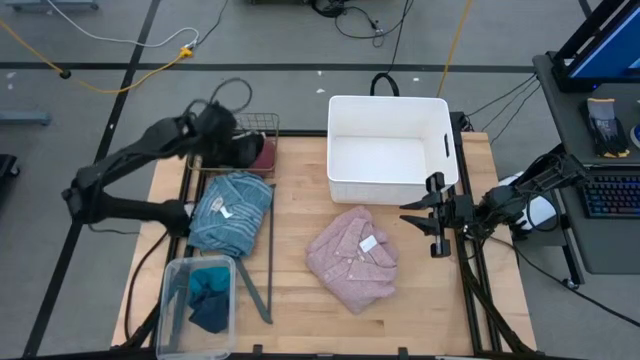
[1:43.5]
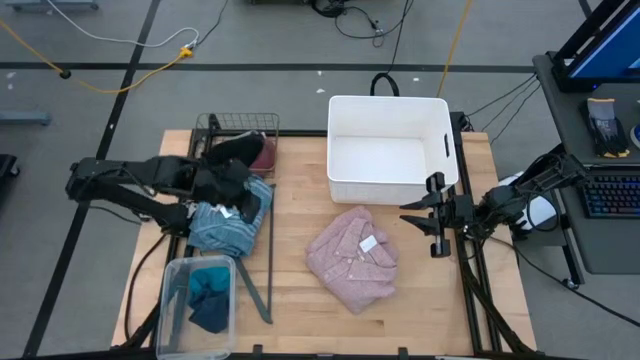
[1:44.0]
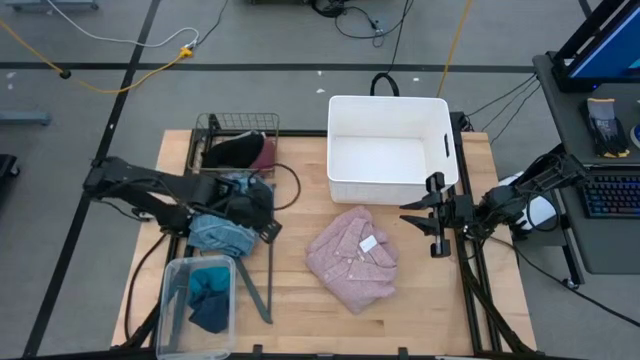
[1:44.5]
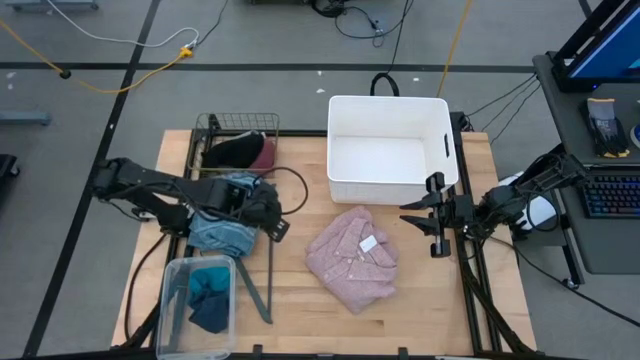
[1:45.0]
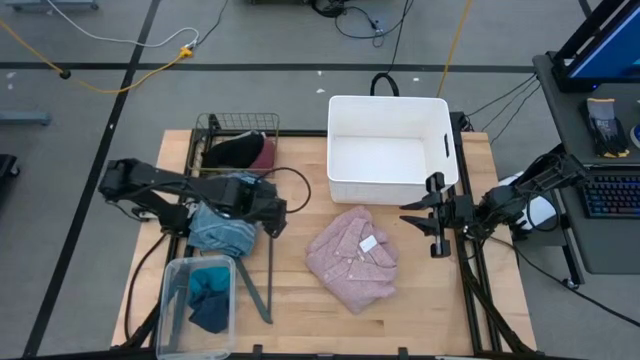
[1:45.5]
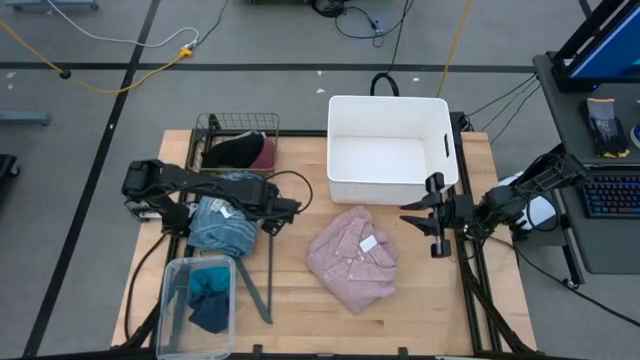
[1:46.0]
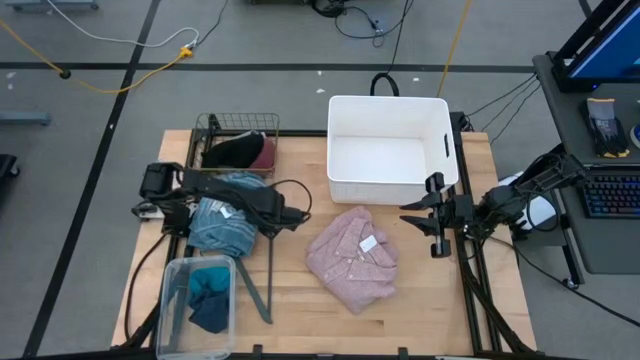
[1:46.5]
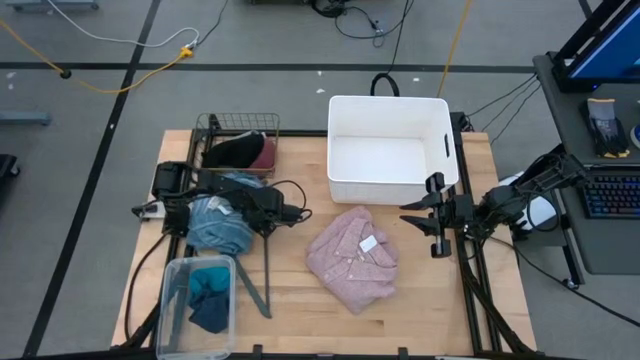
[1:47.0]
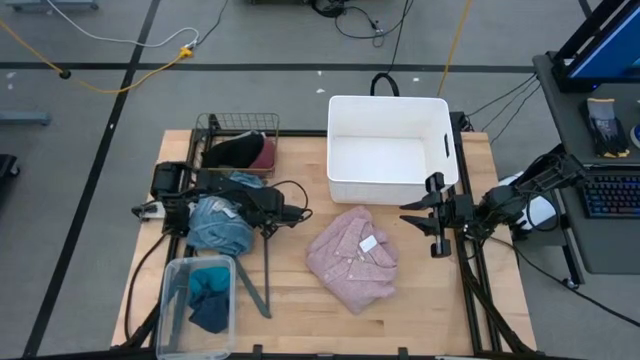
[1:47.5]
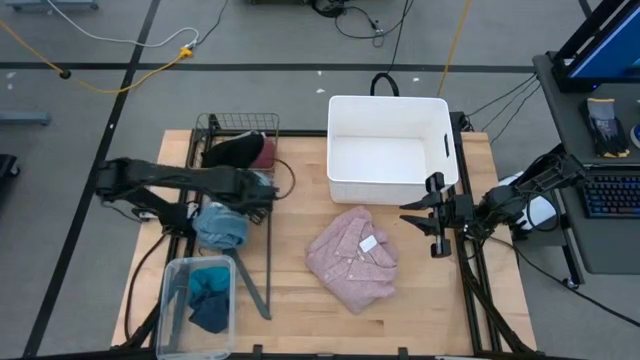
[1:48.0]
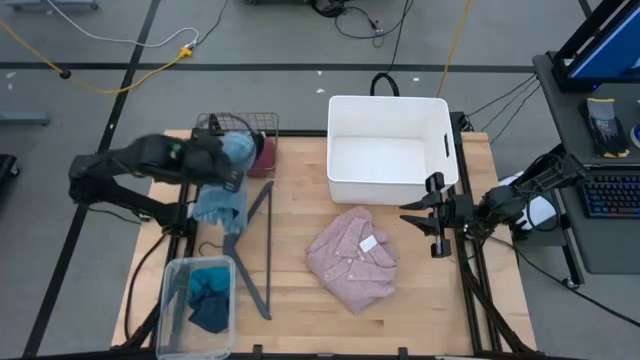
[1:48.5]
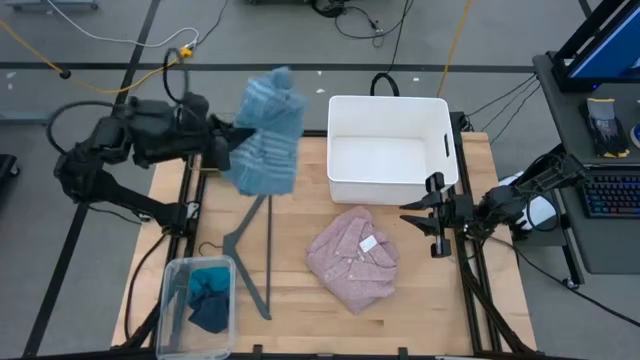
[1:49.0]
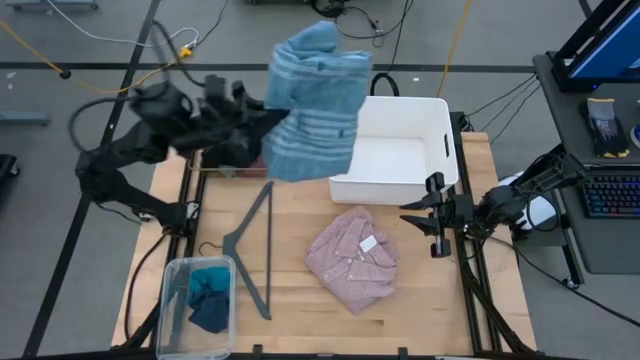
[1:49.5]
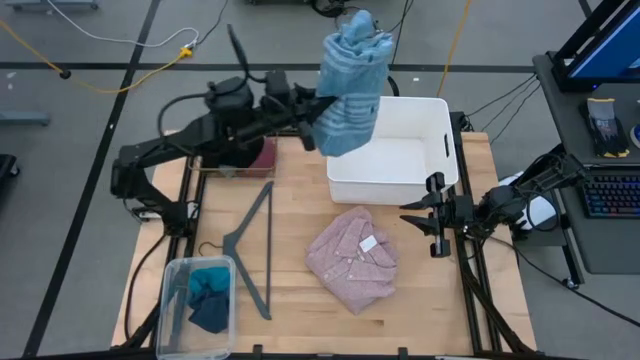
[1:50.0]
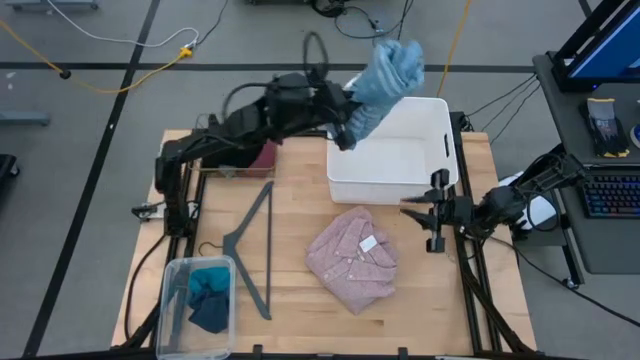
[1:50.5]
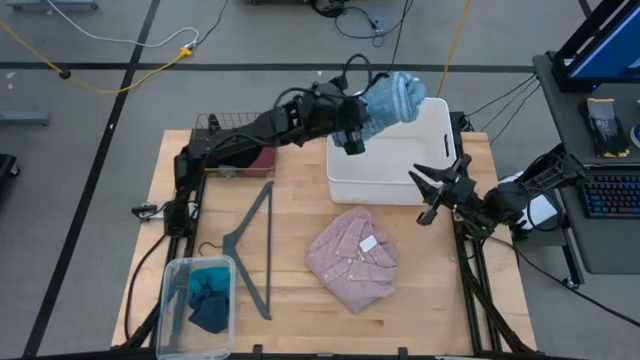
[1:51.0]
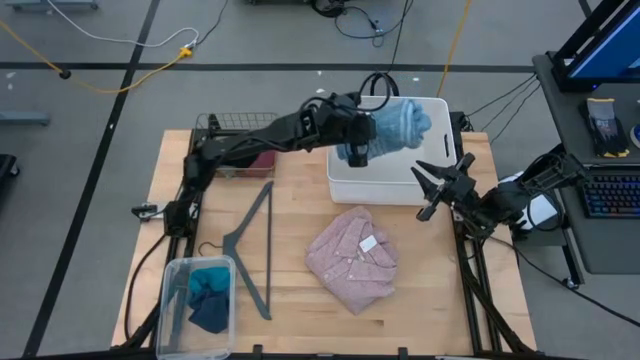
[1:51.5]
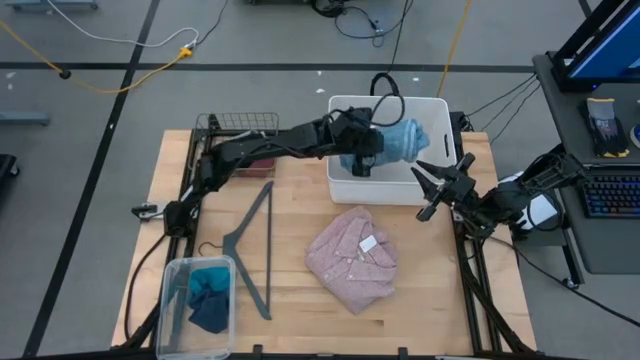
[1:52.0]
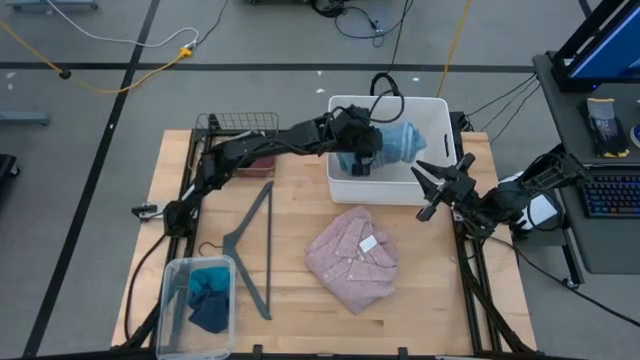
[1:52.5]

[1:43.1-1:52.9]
Task: Pick & Place Cloths
Put the blue shirt into the white bin

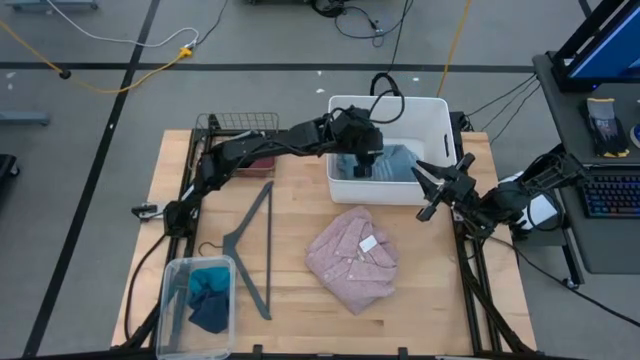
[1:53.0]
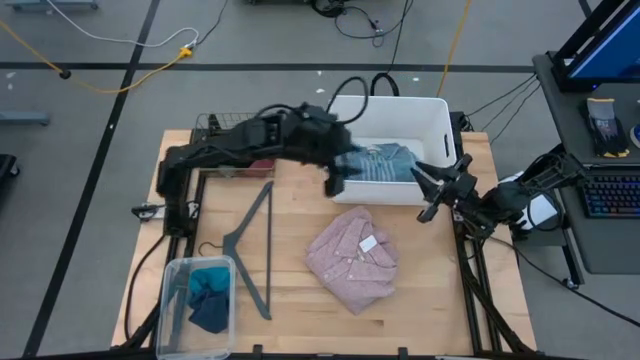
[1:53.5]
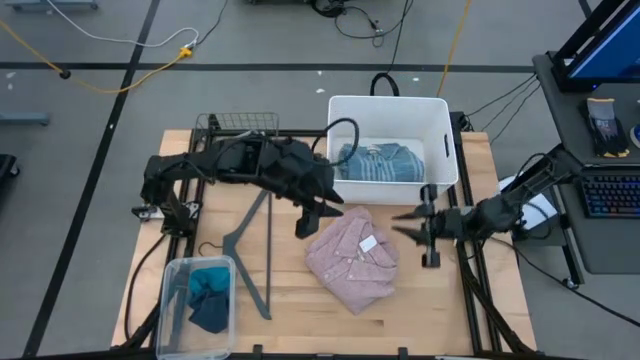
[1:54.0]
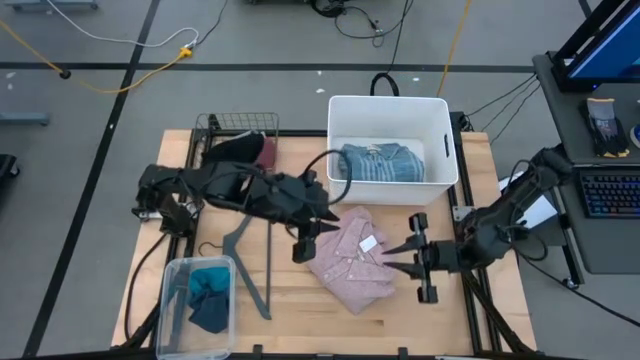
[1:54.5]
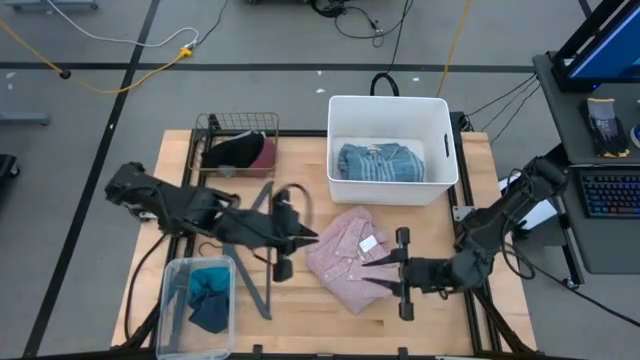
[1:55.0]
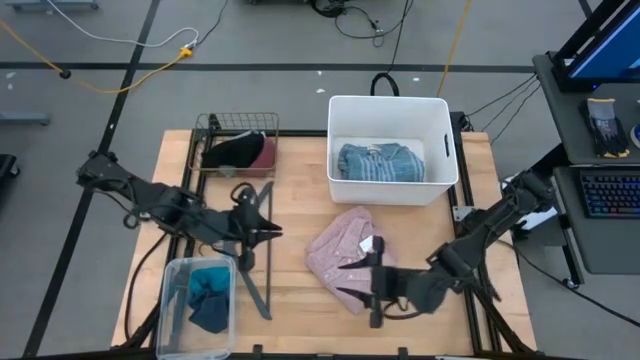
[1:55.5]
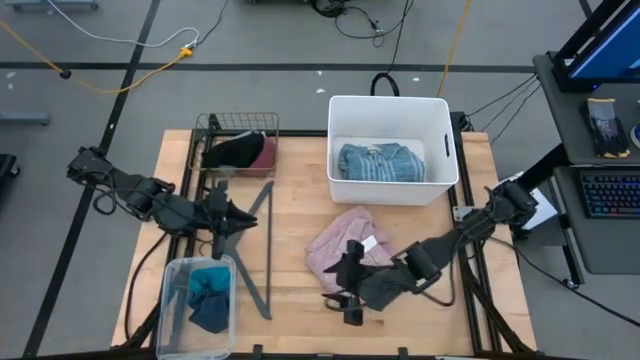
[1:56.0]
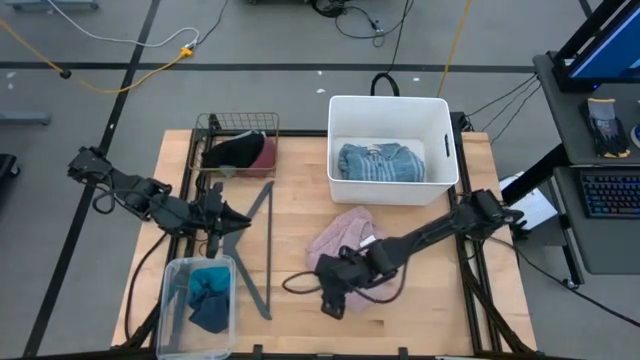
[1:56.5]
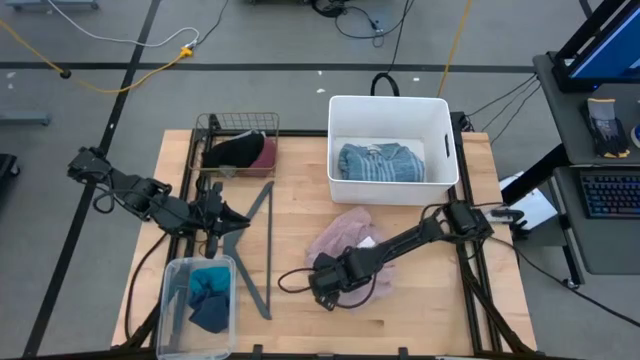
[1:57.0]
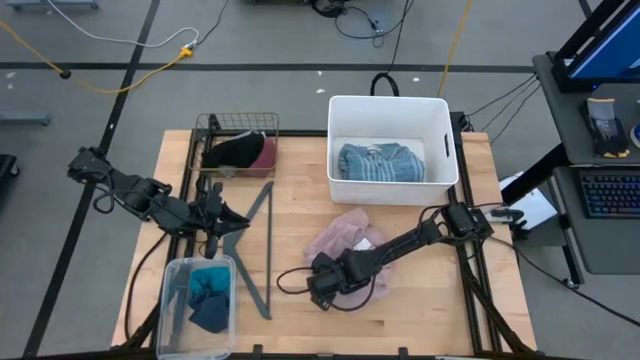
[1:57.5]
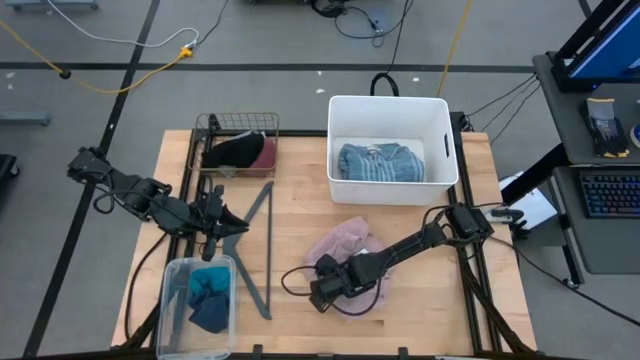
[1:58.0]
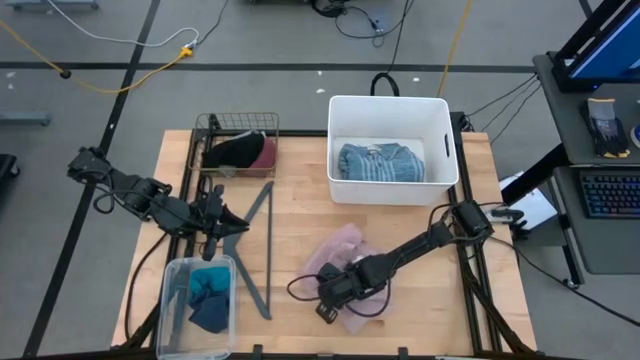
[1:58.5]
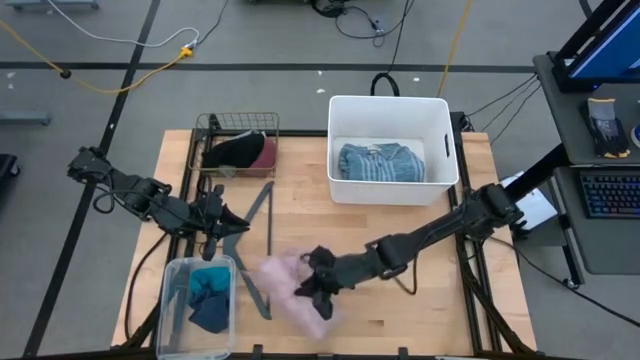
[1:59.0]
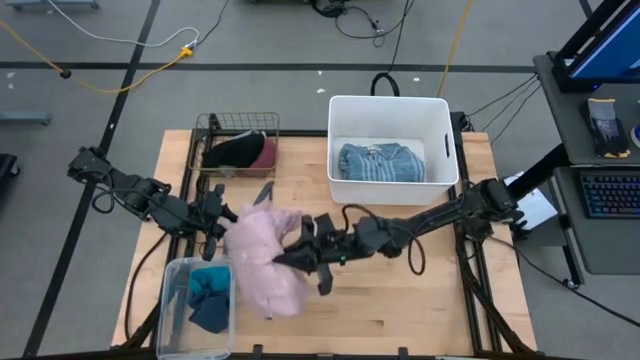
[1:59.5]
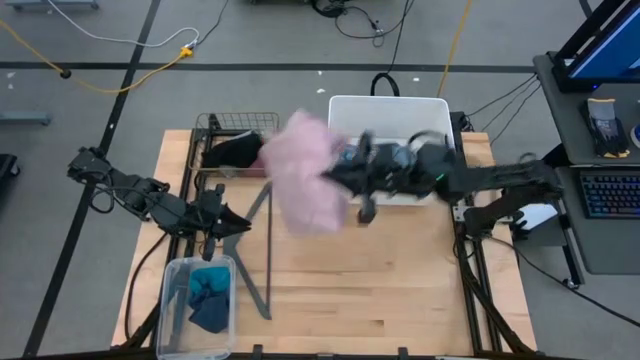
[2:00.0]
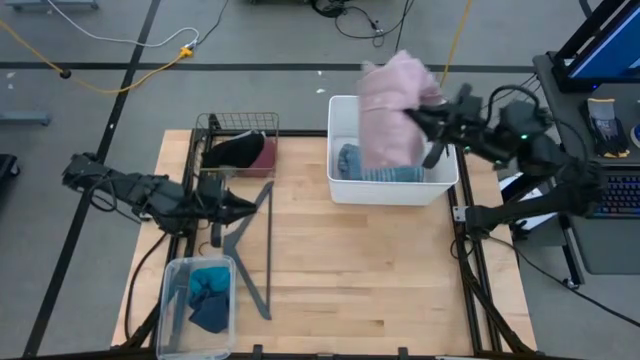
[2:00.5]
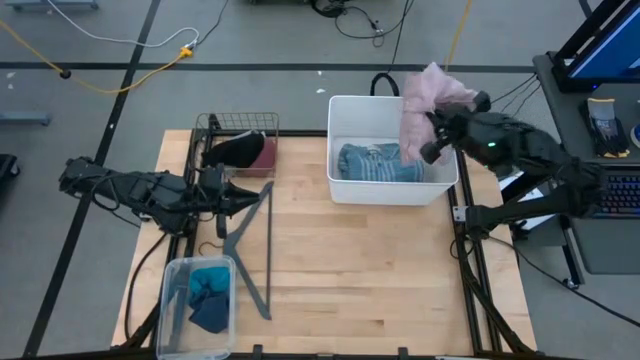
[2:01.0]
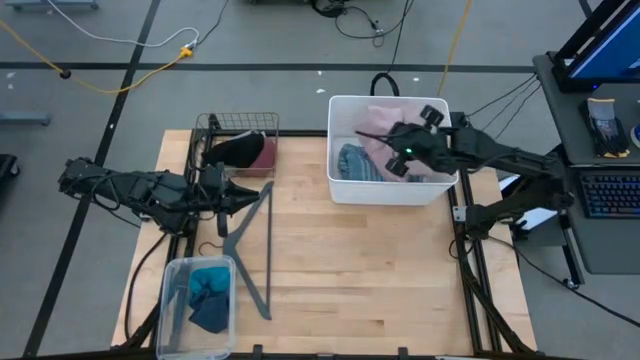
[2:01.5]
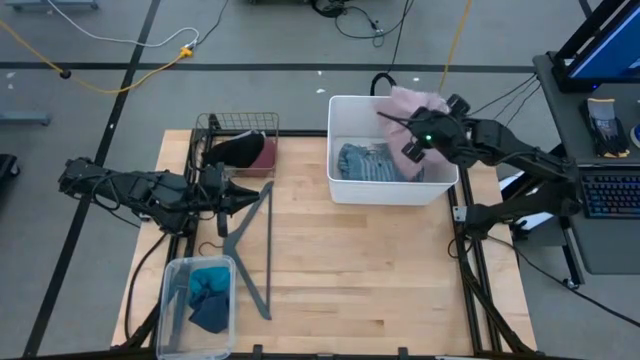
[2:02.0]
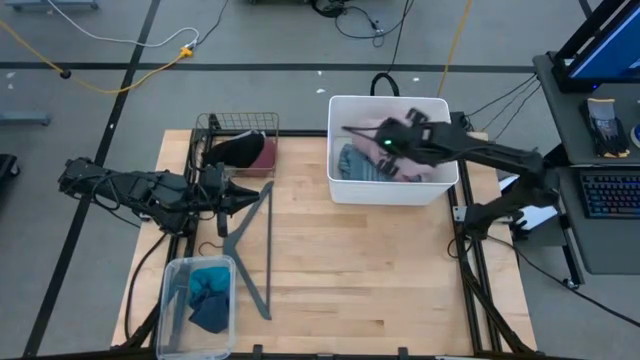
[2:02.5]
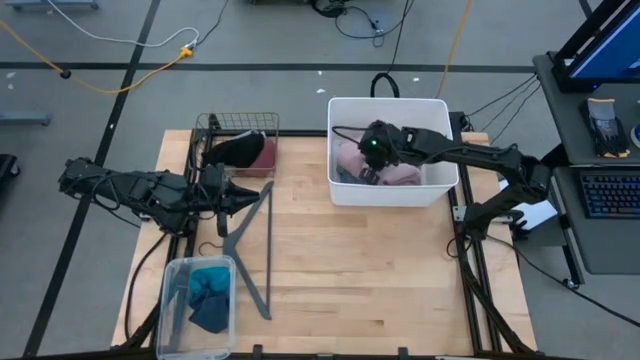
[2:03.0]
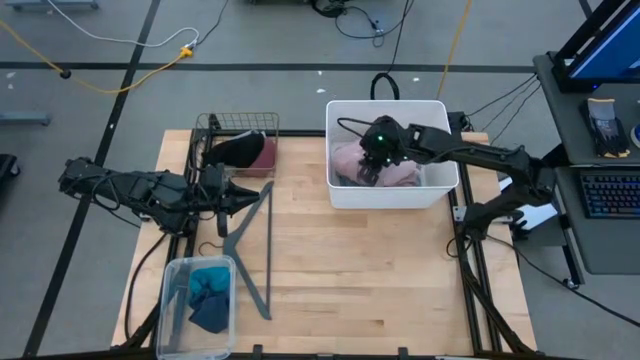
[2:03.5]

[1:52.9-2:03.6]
Put the pink shirt into the white bin

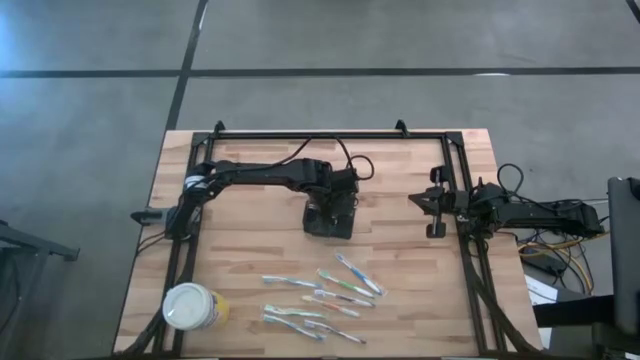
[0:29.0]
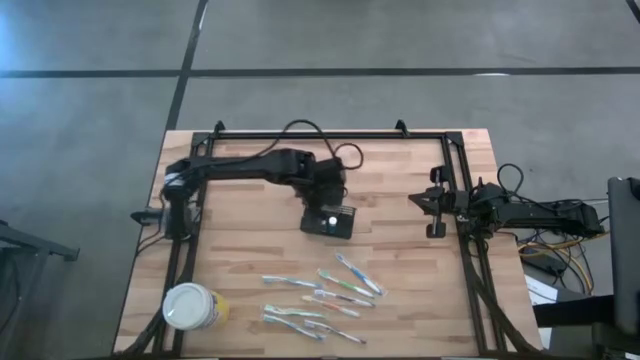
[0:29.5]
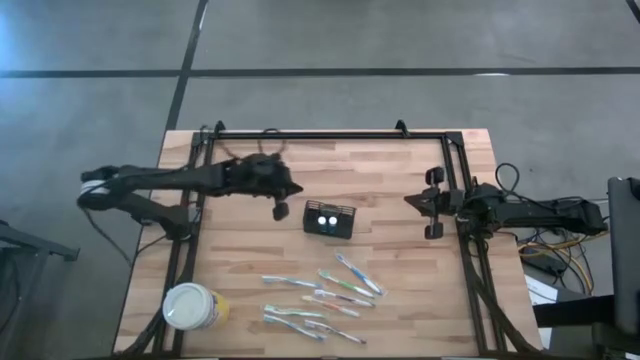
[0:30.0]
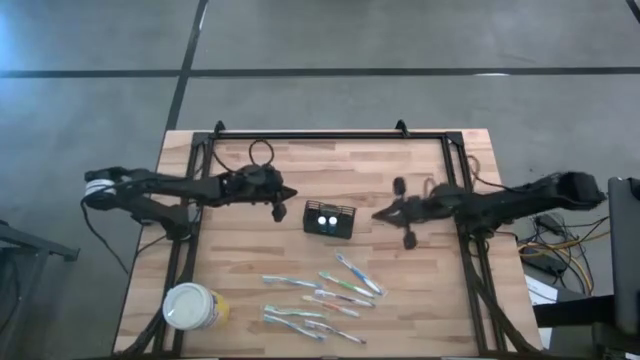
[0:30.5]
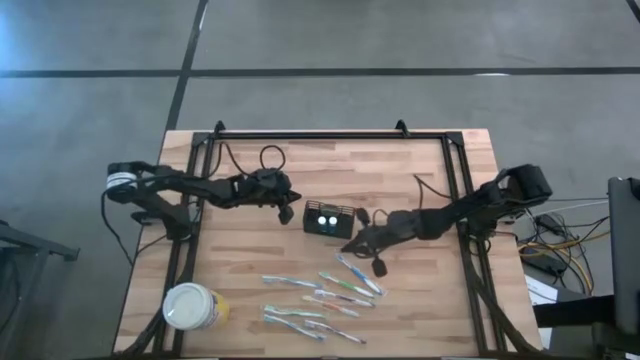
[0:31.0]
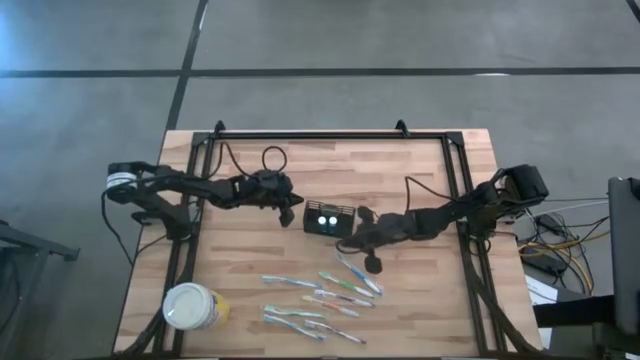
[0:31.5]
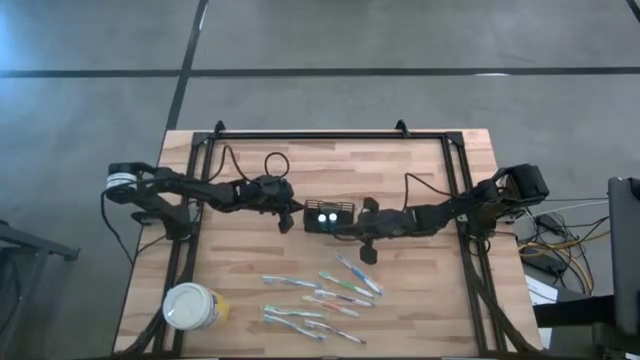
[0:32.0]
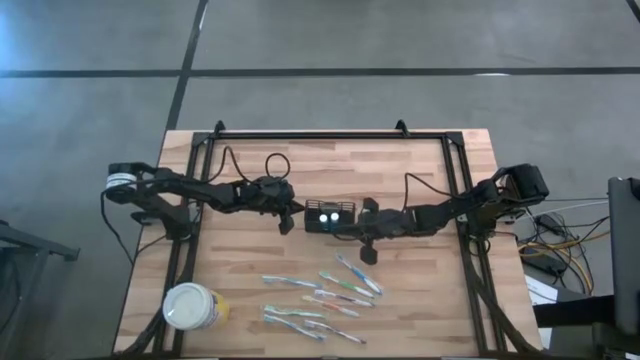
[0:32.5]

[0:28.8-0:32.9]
Task: Pick & Place toothbrushing station
Adjust the wire organizer
